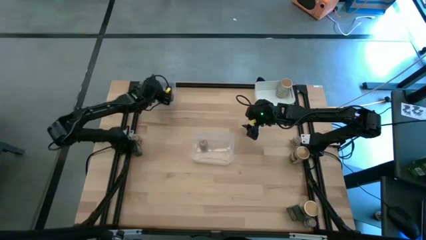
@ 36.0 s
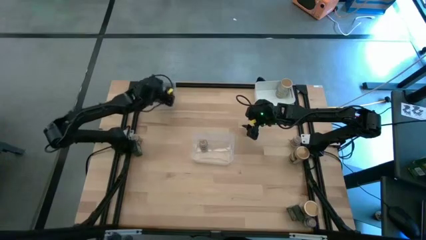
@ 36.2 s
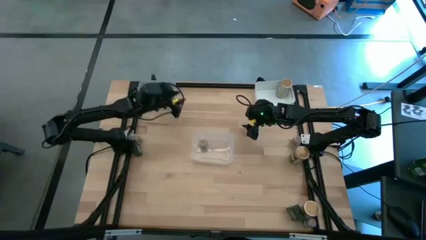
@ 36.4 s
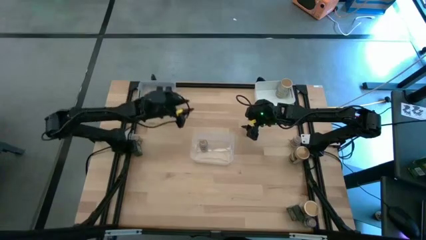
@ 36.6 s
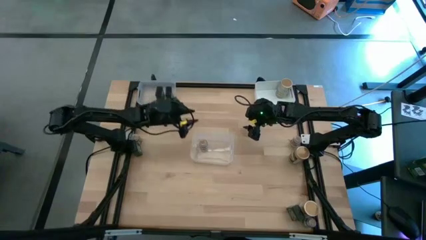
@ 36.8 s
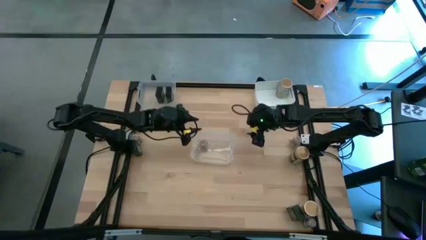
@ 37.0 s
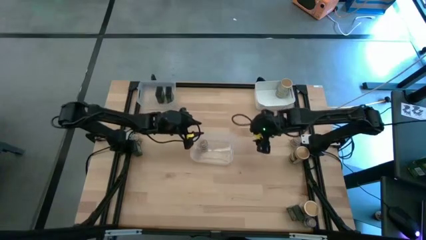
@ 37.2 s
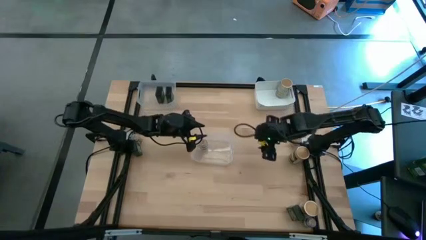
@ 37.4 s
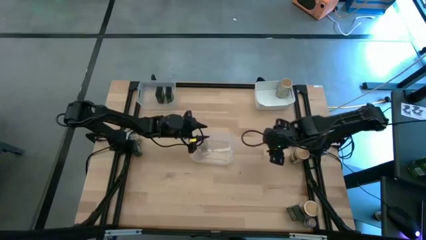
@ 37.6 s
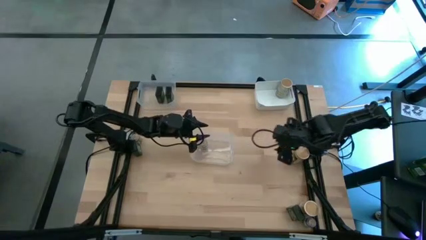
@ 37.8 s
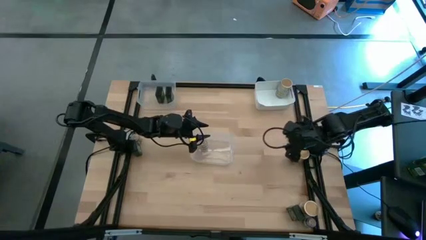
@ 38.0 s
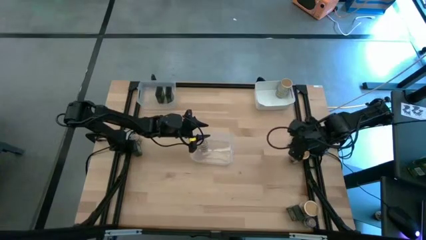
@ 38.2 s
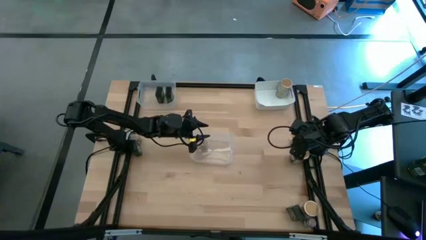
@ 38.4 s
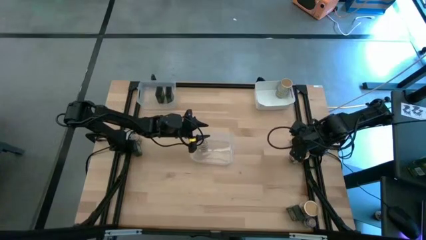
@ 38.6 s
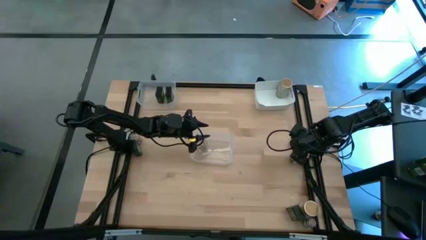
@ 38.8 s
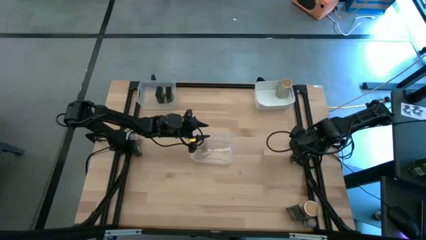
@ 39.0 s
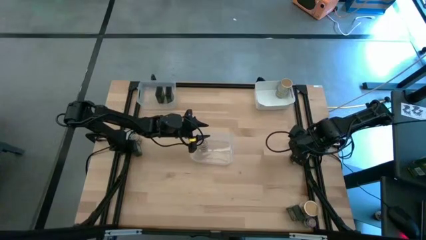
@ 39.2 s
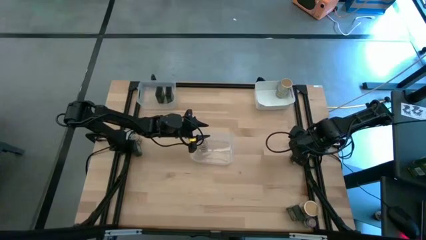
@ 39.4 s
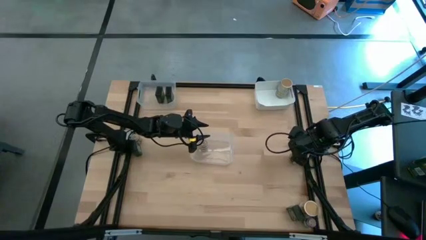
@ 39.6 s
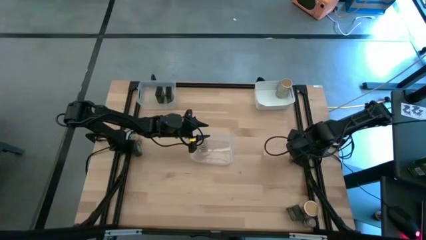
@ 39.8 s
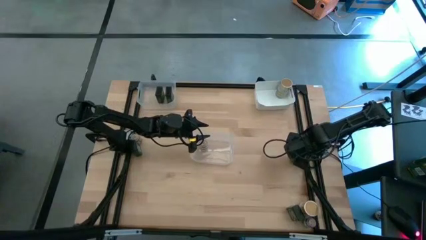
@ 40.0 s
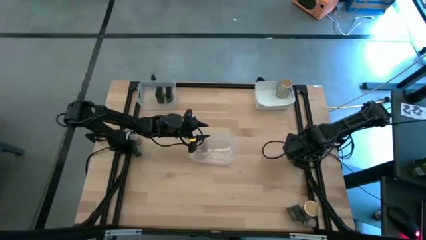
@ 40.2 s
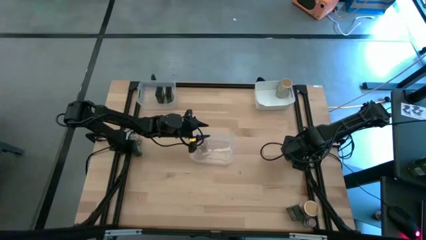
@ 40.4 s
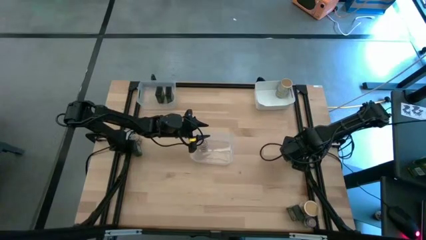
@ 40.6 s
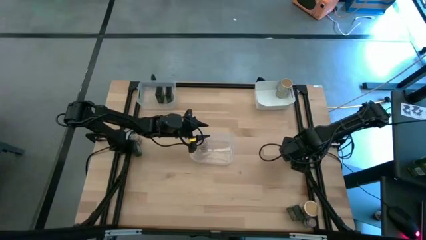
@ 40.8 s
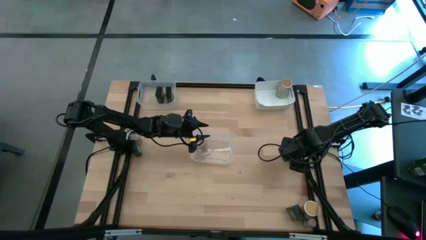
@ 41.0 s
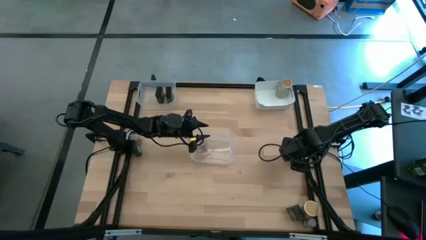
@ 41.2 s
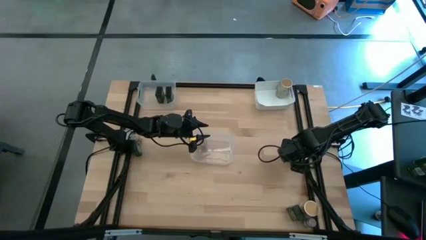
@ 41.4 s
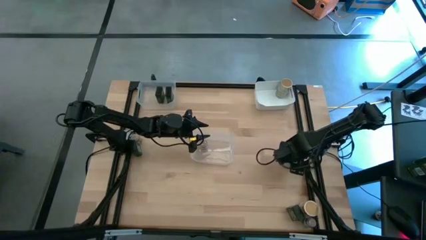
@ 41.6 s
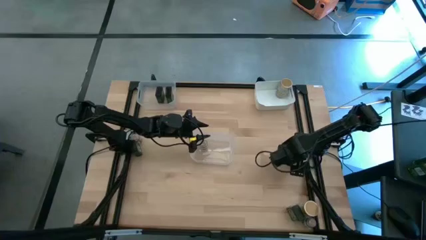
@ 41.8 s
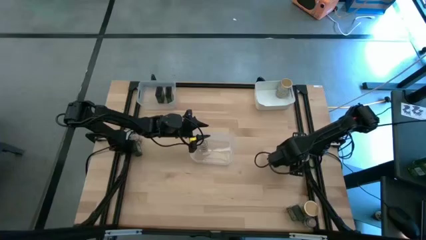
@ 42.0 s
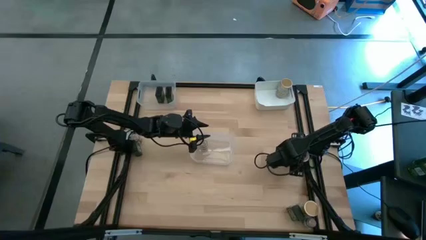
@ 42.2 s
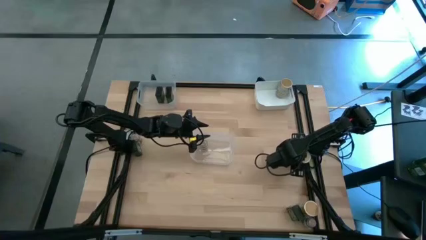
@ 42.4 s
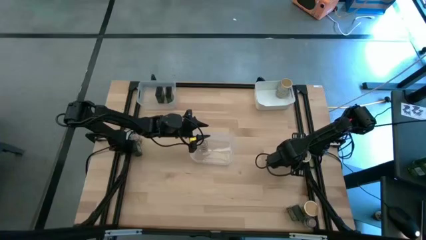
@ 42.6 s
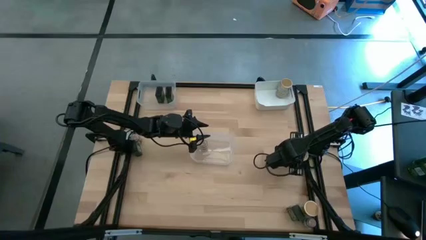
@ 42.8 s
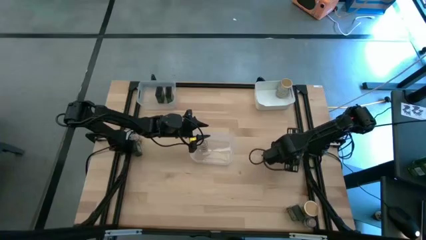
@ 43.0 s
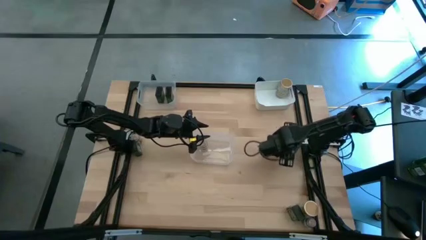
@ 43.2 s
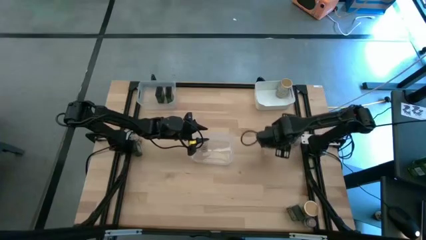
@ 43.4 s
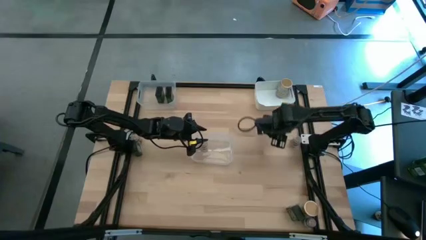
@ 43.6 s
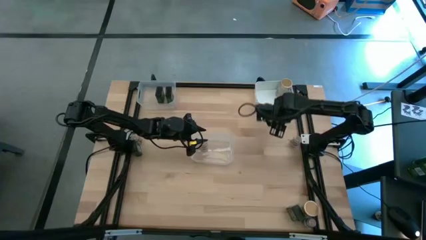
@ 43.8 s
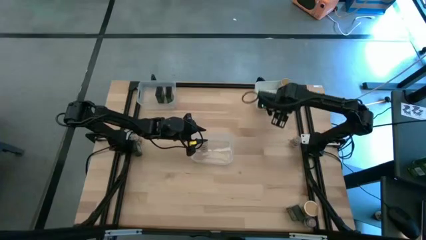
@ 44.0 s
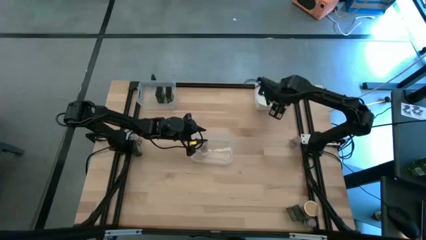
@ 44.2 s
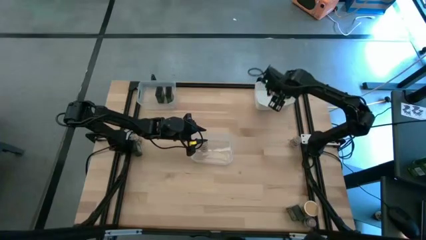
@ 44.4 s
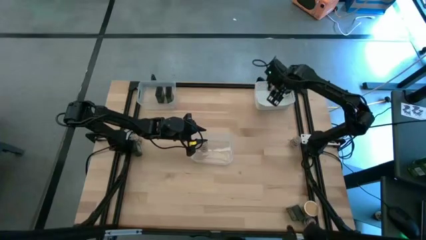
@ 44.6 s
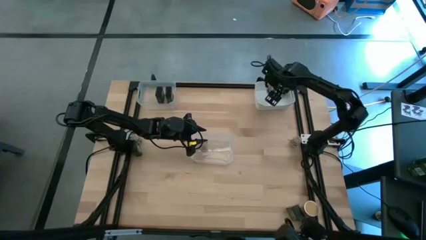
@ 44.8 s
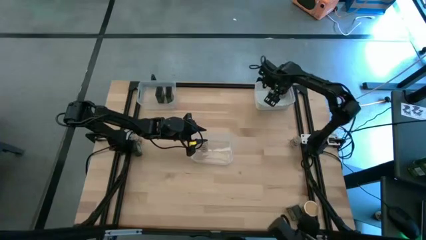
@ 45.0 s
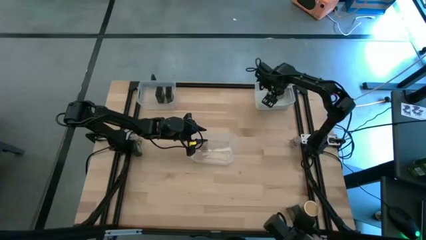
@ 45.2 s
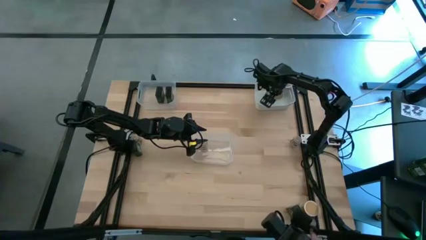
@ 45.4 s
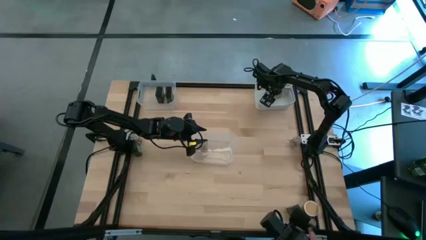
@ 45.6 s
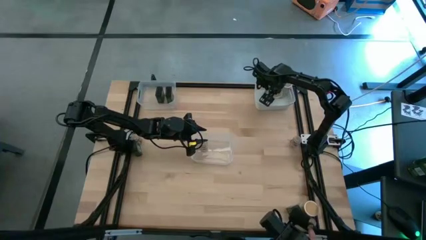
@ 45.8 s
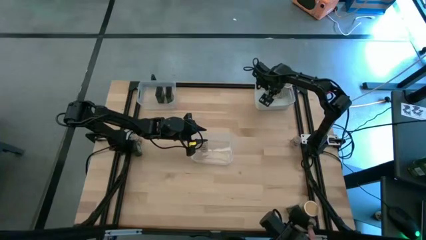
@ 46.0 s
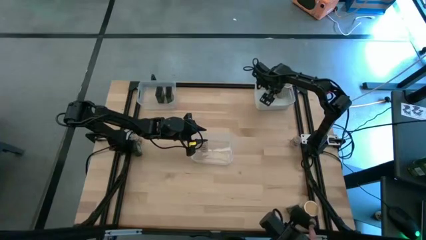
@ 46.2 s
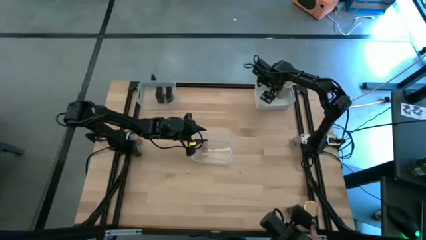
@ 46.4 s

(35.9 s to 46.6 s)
Task: Sort spices by type
Put the gold seasoning bottle into the white bin
